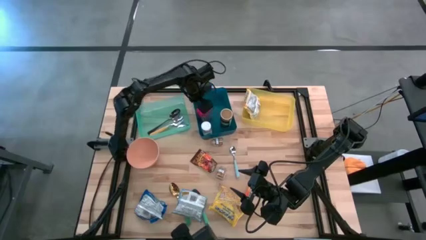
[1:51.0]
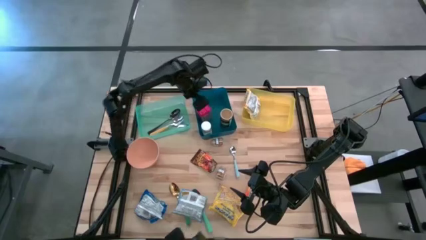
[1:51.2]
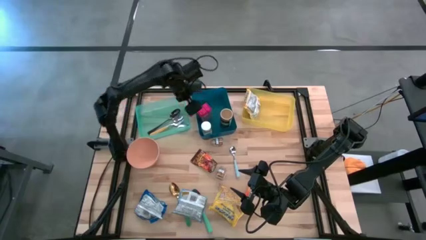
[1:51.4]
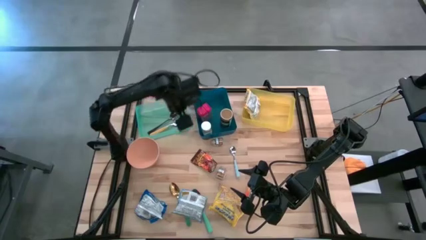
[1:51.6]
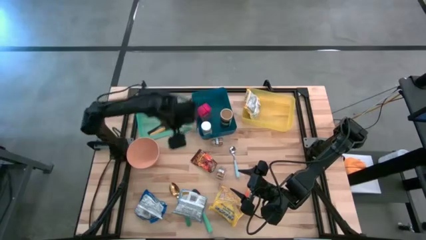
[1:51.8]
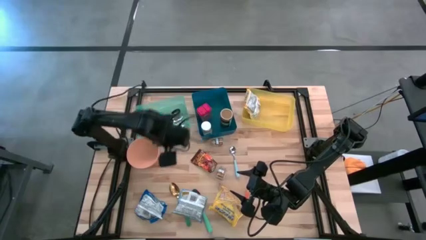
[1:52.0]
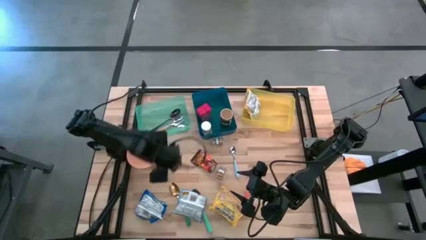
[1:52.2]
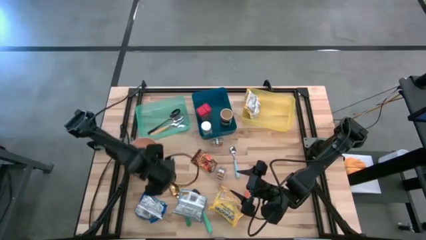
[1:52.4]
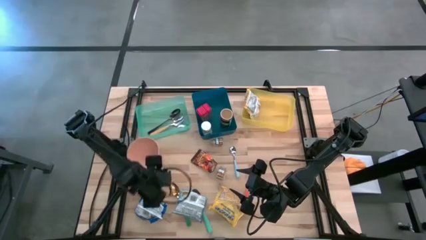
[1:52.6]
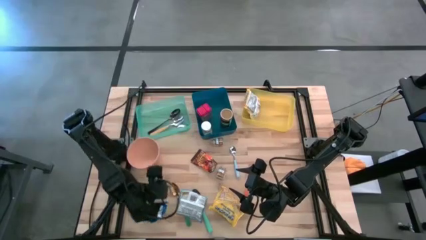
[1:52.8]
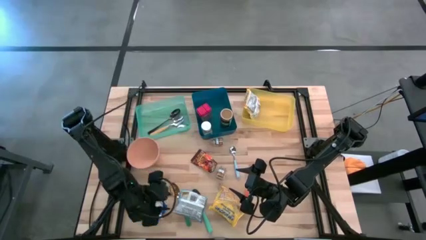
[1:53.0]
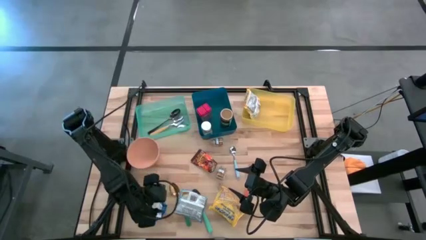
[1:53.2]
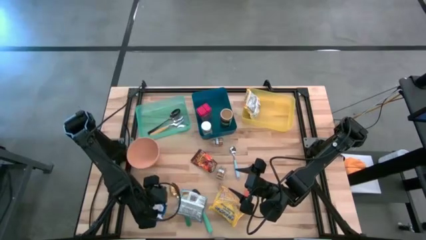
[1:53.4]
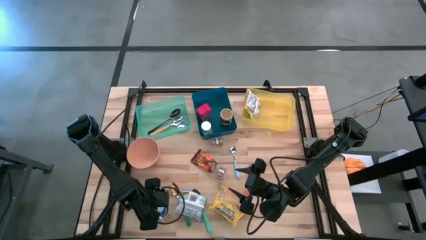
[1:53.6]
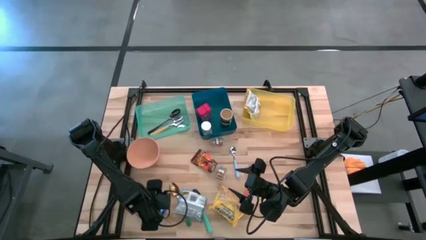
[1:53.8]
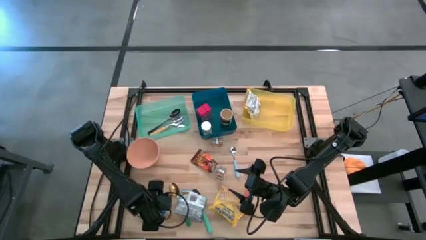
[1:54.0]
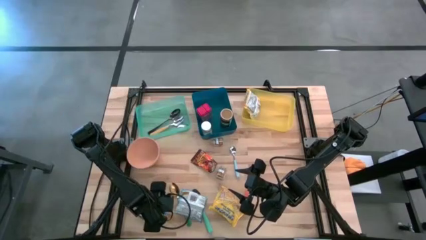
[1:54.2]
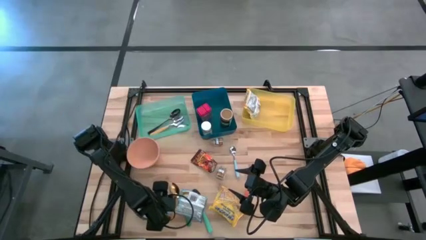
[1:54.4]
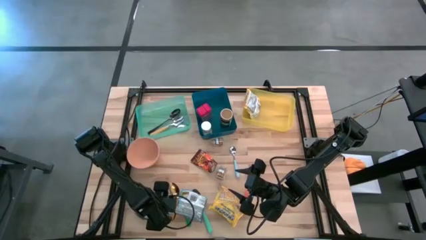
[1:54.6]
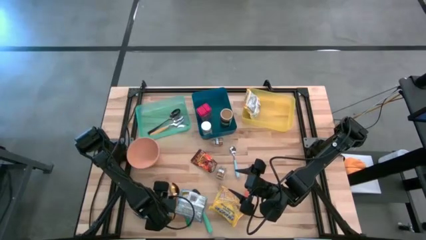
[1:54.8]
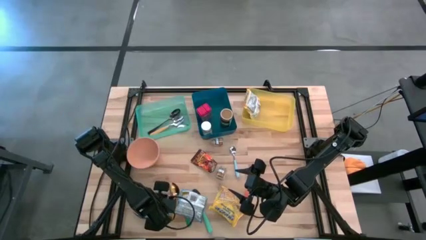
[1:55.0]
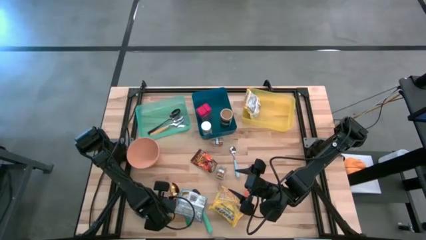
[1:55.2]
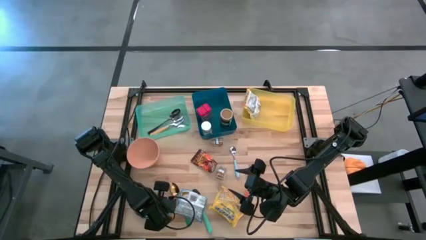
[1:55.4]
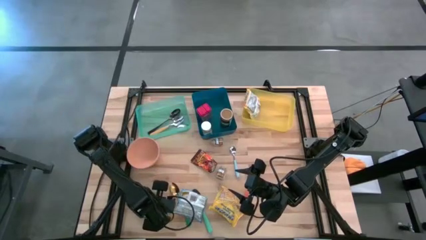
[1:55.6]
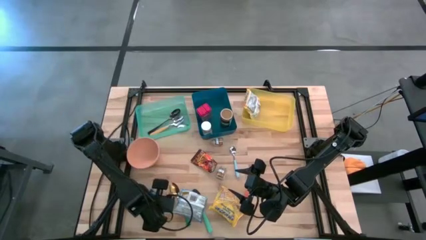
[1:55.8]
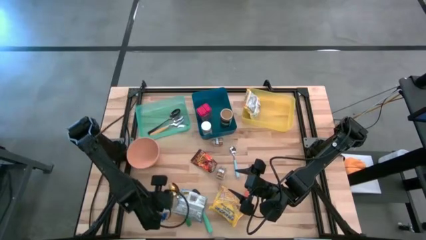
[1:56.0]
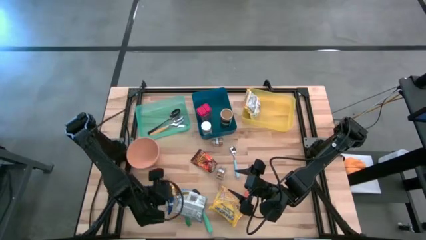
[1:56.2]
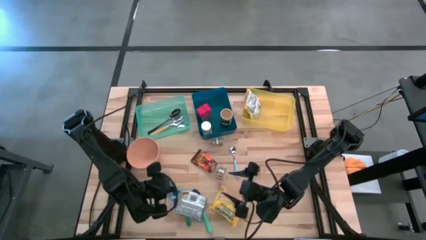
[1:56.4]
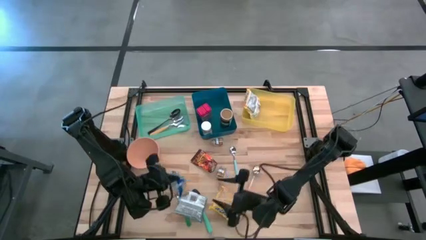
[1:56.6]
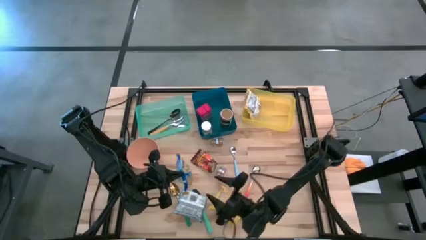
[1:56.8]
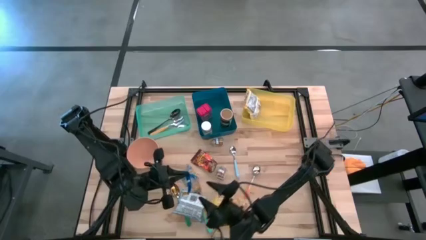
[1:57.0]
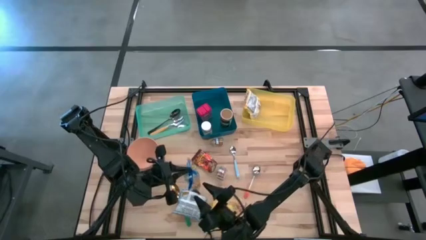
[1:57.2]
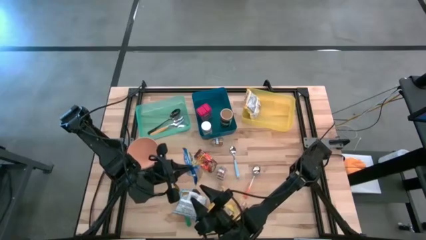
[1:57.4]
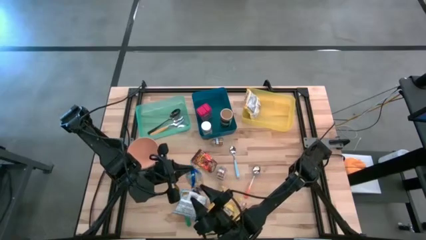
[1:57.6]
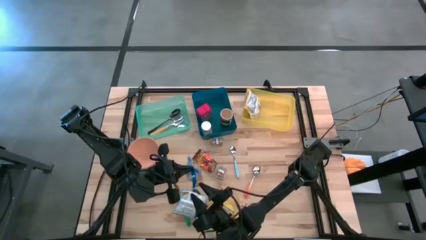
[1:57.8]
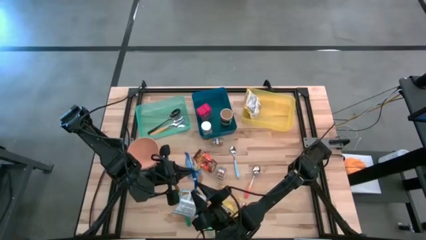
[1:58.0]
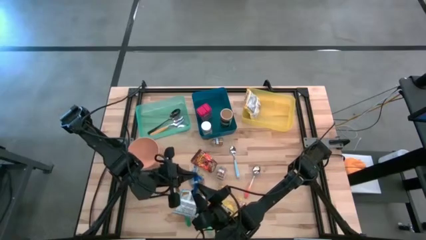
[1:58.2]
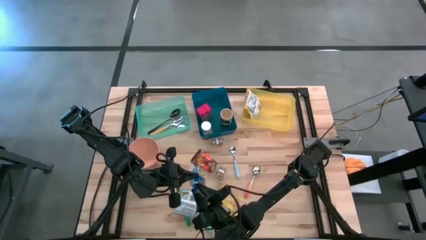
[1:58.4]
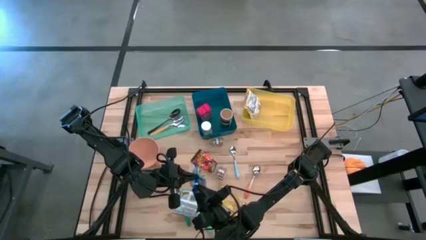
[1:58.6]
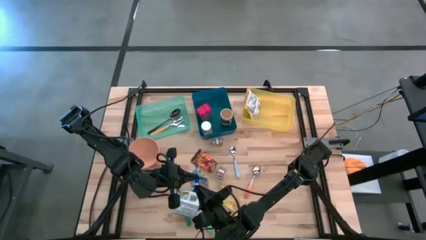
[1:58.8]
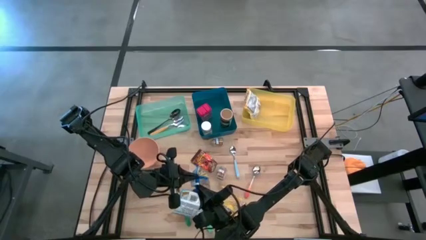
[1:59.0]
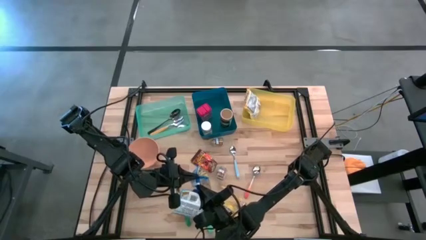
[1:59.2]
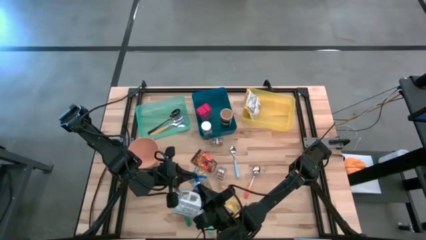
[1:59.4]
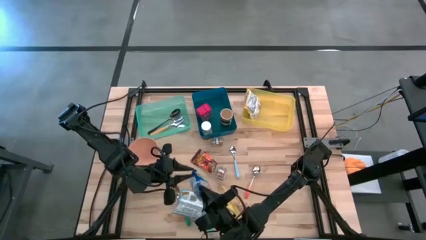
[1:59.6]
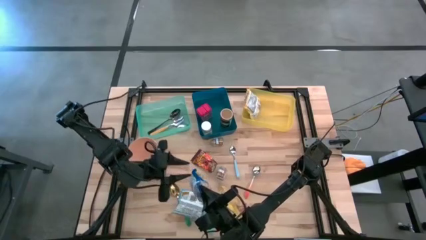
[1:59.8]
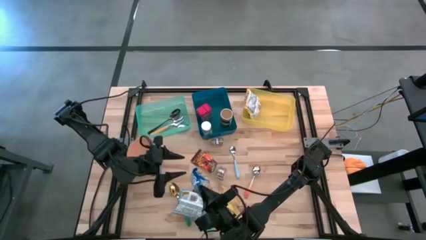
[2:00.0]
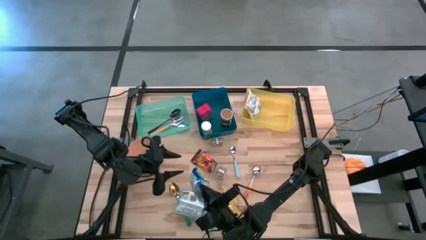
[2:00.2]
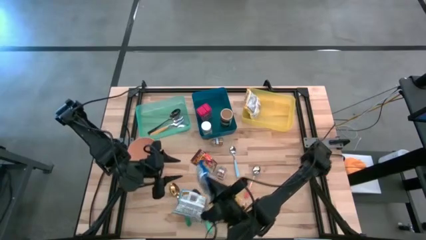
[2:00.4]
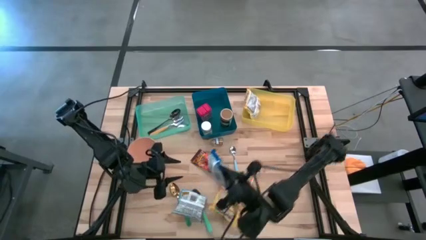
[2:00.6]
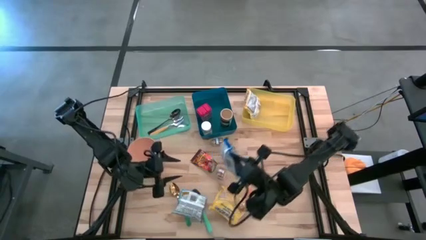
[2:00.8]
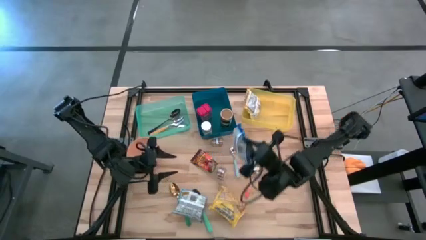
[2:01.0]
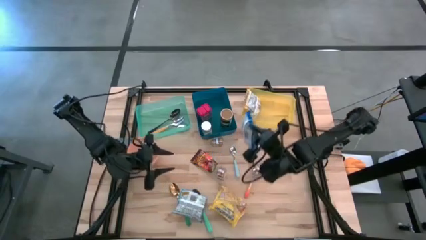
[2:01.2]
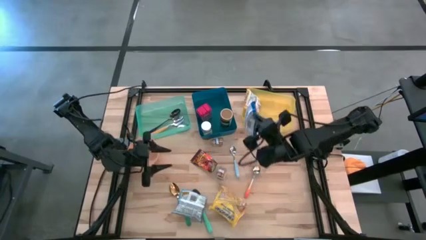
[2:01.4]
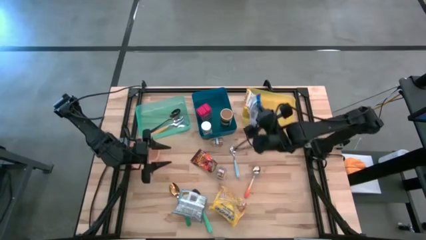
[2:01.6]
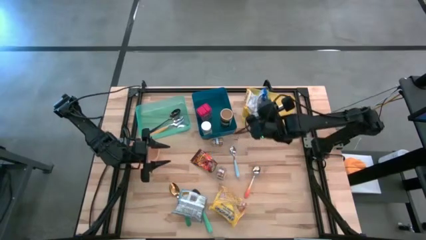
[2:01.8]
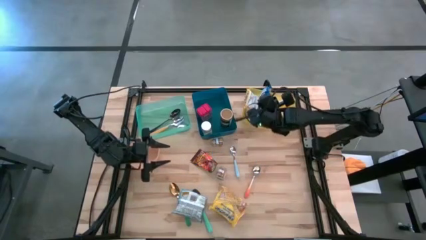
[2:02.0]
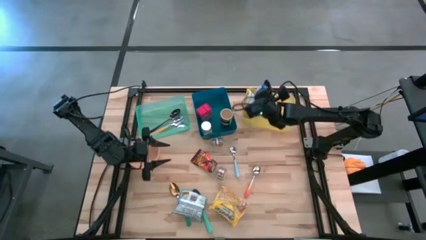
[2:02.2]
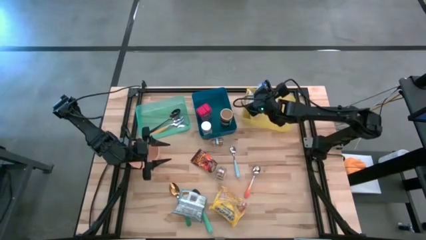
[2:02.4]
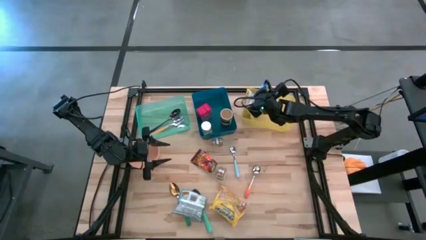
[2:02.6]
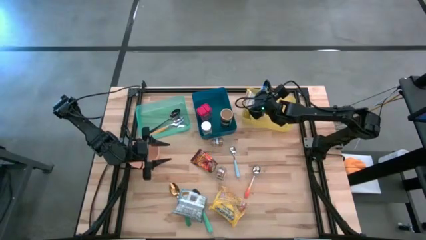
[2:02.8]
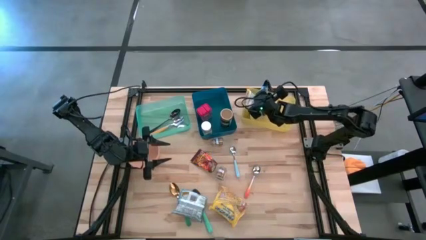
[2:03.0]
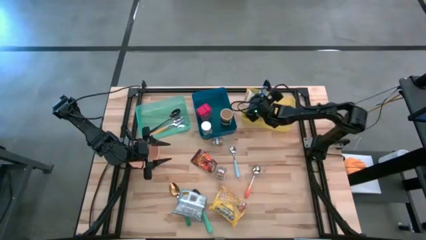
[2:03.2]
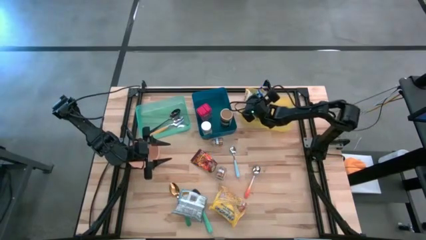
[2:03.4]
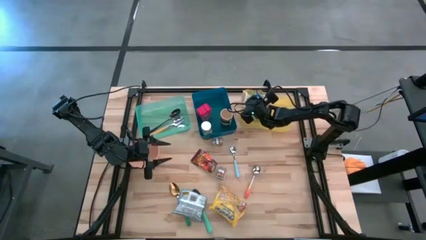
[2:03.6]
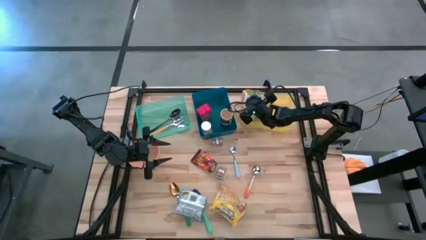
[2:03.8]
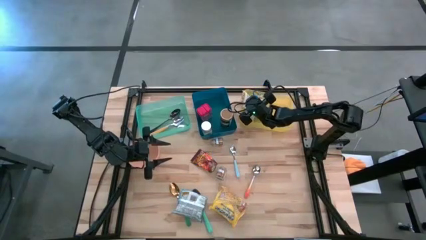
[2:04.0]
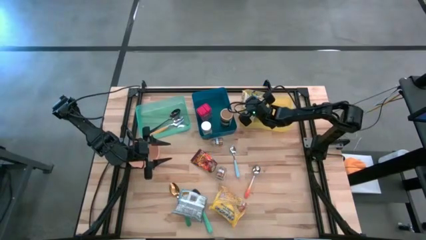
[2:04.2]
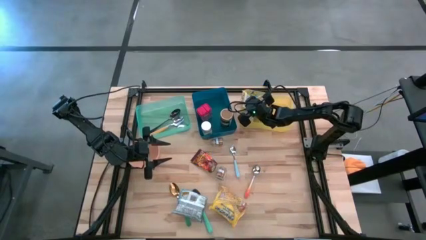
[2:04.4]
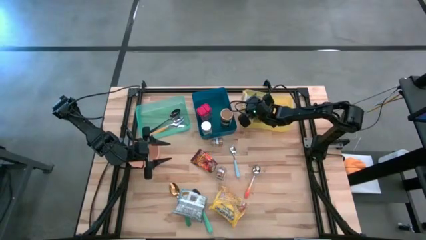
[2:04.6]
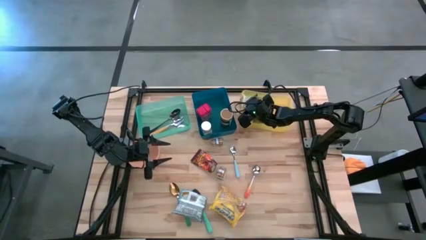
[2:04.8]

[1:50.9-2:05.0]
Put the blue noodle pack into the yellow bin
